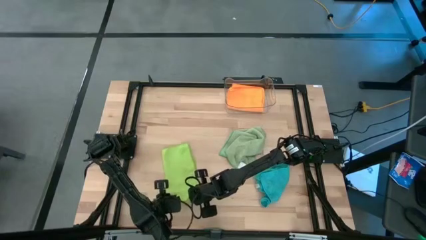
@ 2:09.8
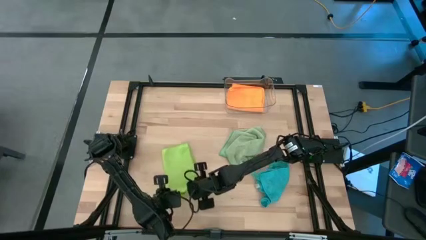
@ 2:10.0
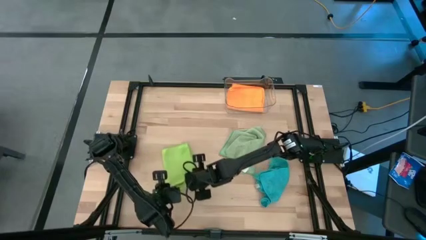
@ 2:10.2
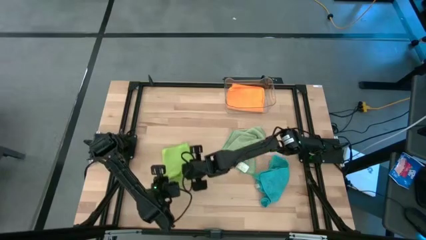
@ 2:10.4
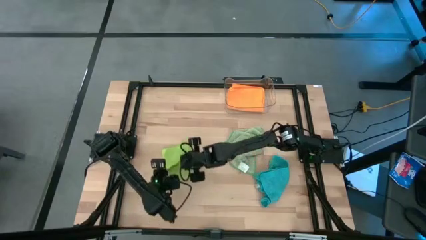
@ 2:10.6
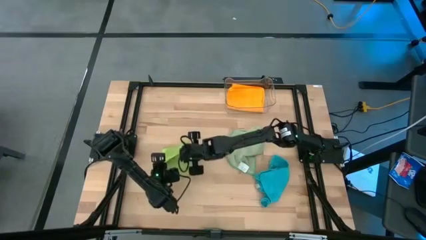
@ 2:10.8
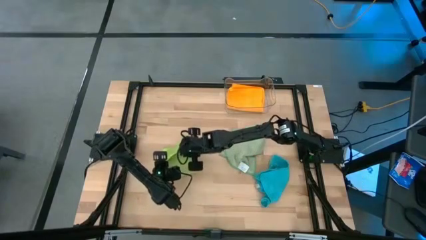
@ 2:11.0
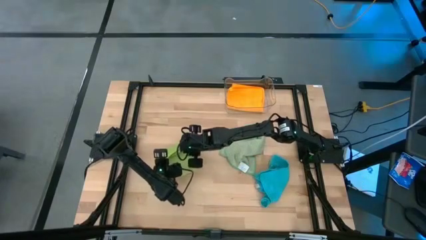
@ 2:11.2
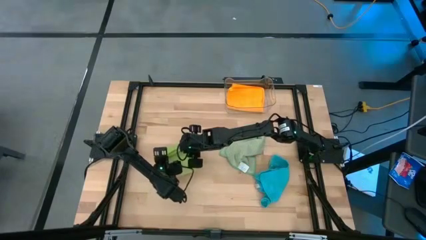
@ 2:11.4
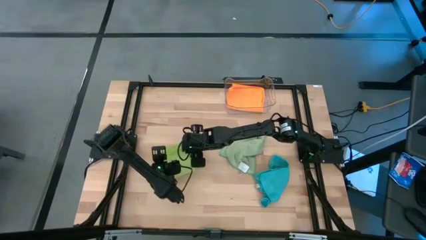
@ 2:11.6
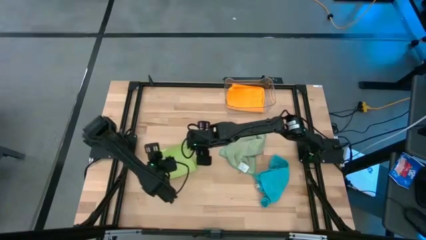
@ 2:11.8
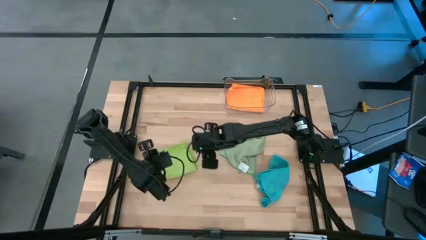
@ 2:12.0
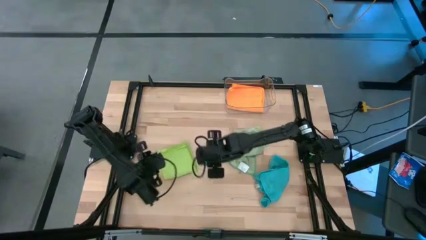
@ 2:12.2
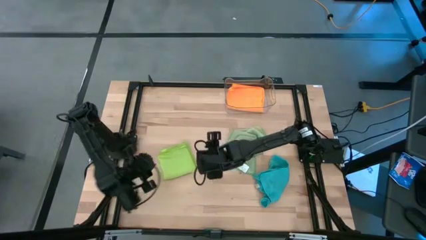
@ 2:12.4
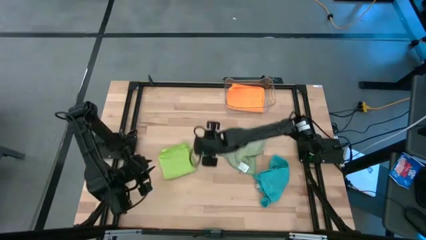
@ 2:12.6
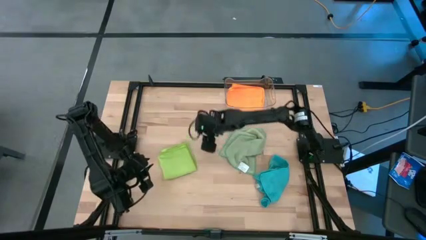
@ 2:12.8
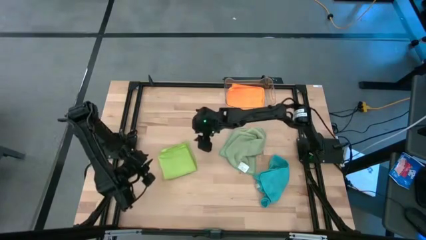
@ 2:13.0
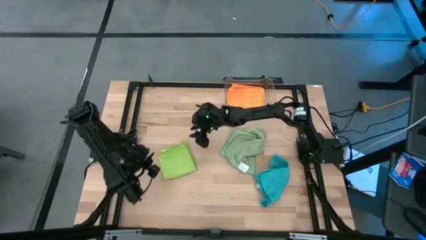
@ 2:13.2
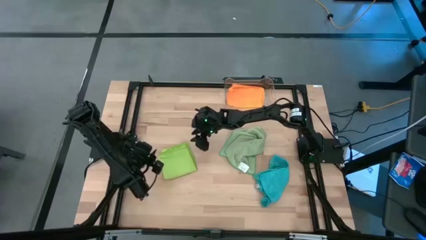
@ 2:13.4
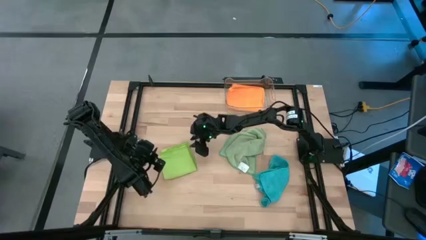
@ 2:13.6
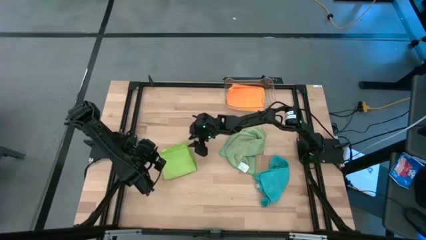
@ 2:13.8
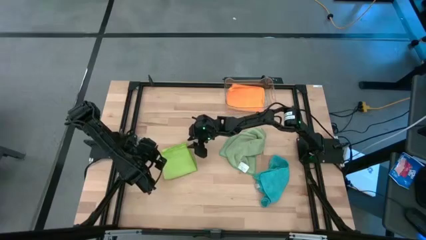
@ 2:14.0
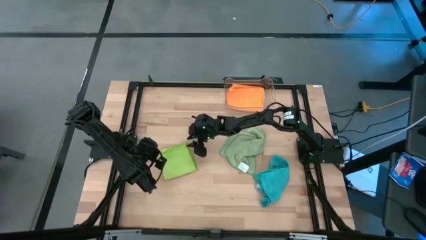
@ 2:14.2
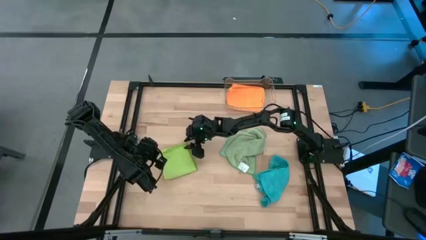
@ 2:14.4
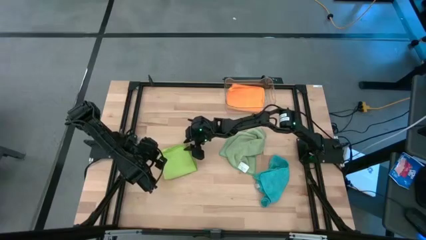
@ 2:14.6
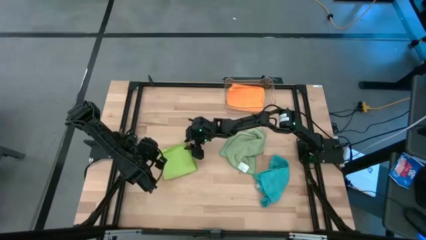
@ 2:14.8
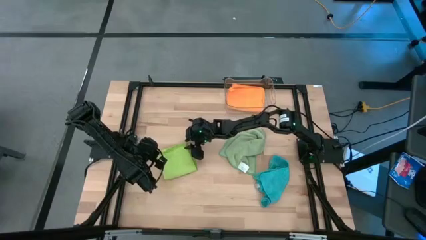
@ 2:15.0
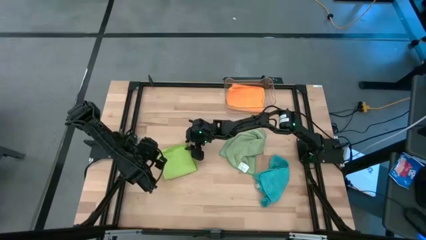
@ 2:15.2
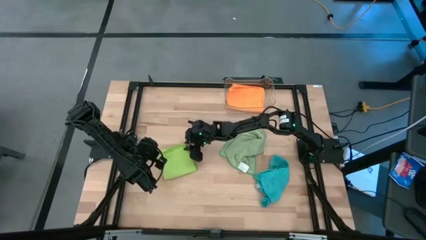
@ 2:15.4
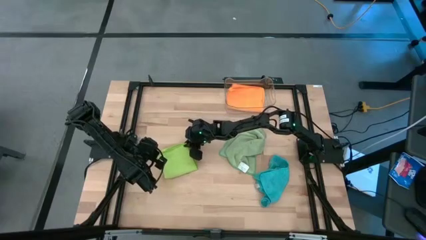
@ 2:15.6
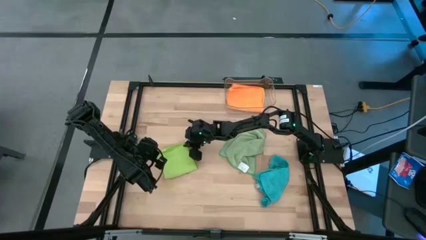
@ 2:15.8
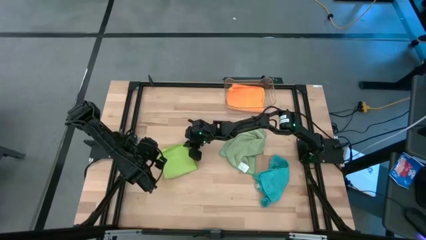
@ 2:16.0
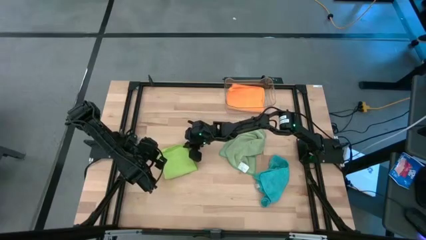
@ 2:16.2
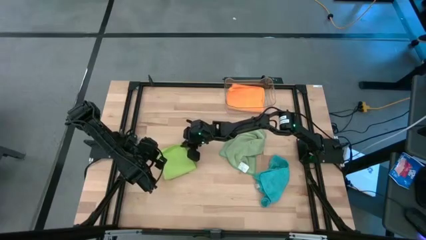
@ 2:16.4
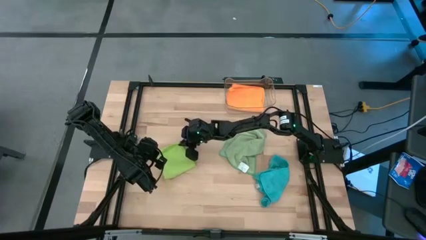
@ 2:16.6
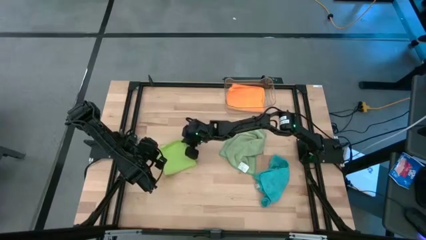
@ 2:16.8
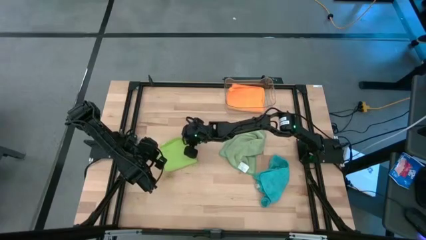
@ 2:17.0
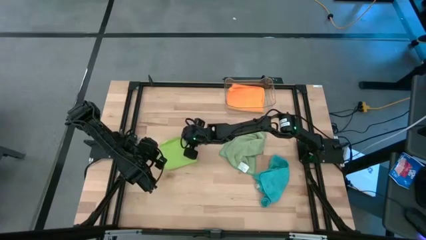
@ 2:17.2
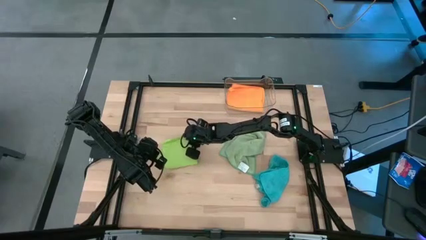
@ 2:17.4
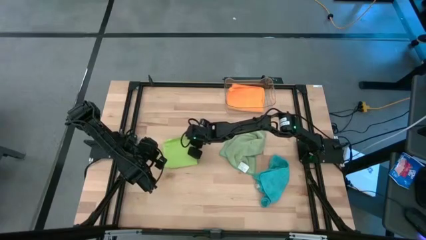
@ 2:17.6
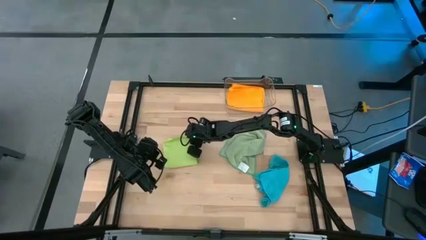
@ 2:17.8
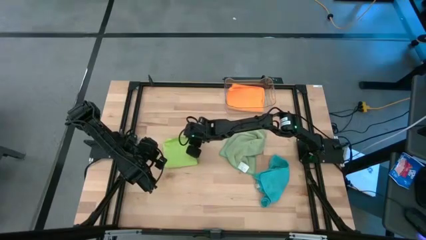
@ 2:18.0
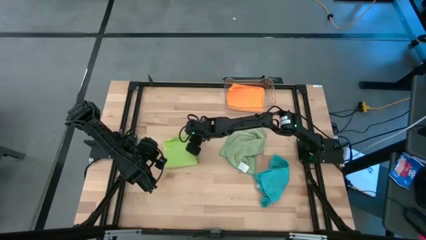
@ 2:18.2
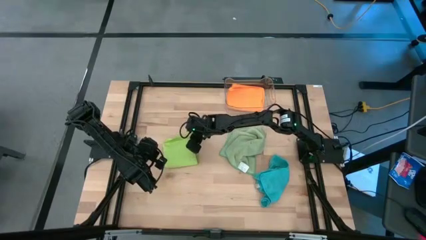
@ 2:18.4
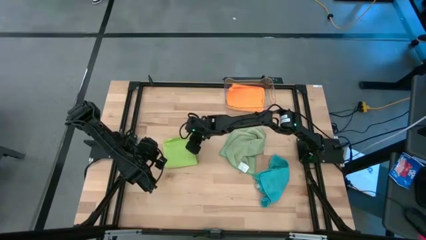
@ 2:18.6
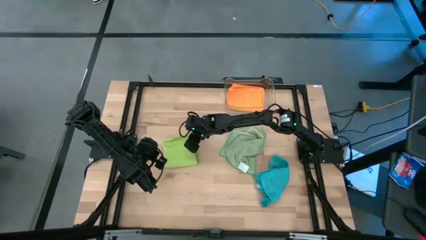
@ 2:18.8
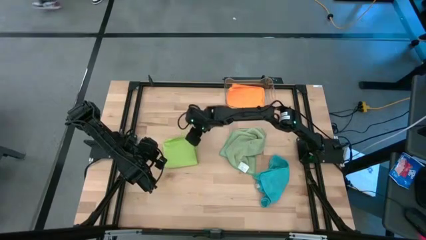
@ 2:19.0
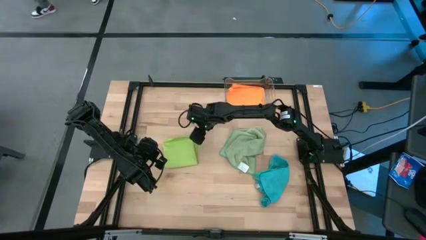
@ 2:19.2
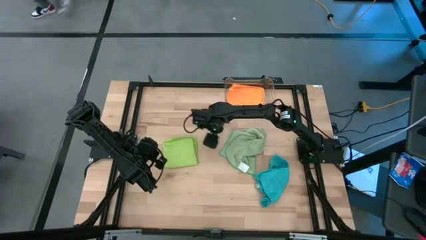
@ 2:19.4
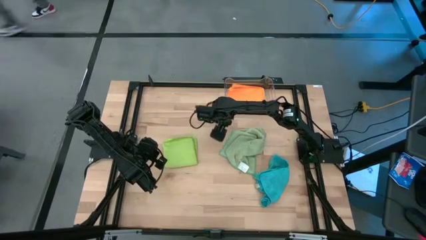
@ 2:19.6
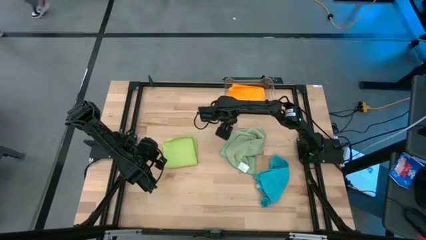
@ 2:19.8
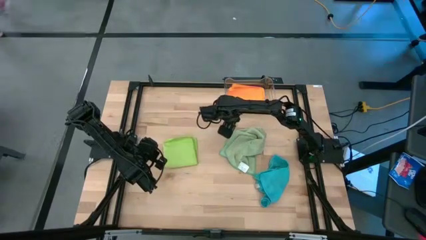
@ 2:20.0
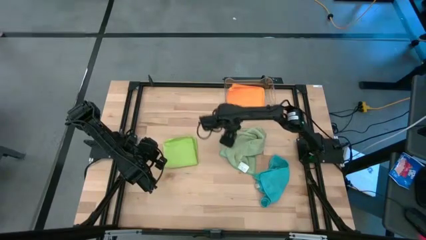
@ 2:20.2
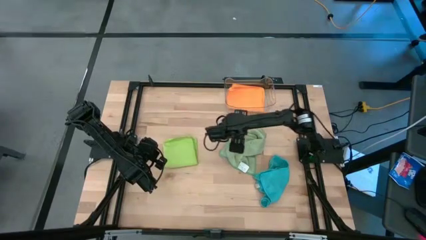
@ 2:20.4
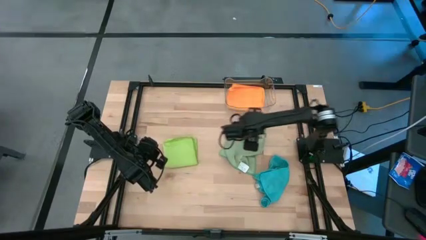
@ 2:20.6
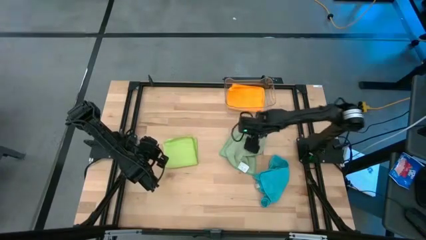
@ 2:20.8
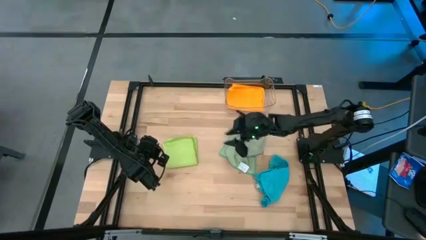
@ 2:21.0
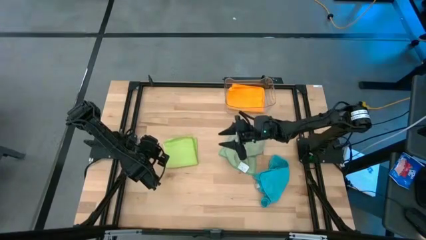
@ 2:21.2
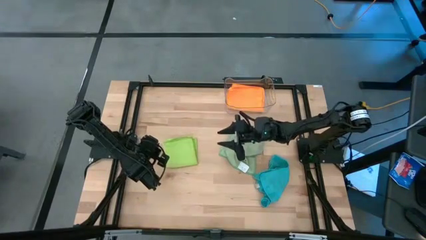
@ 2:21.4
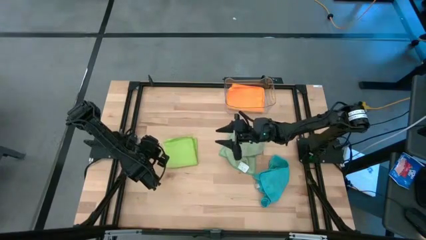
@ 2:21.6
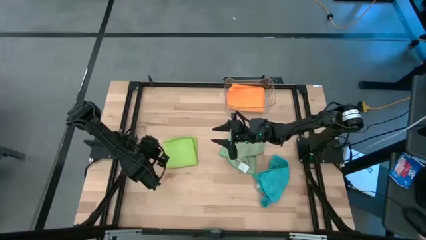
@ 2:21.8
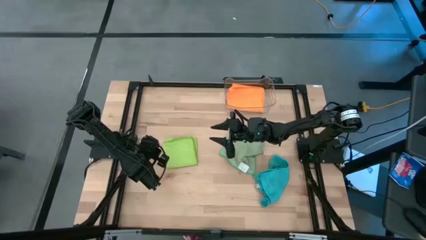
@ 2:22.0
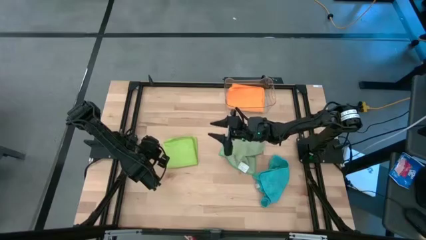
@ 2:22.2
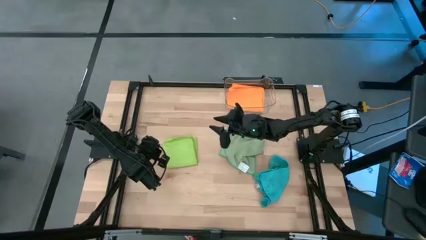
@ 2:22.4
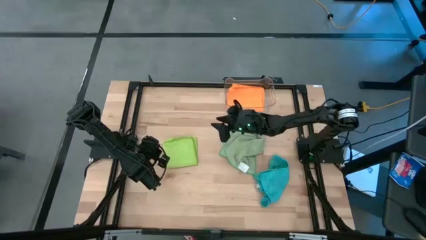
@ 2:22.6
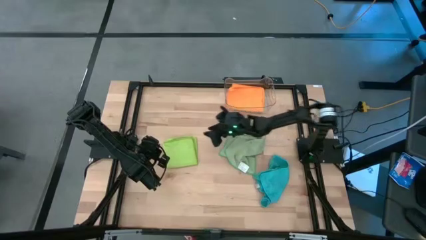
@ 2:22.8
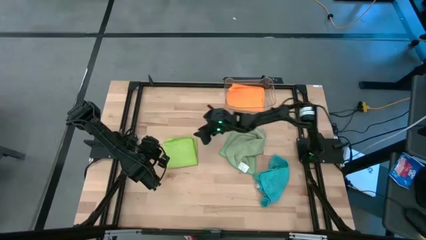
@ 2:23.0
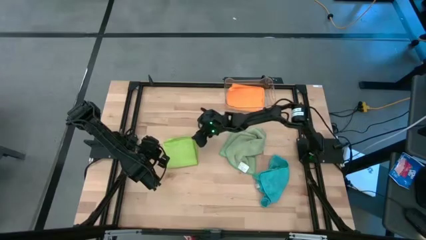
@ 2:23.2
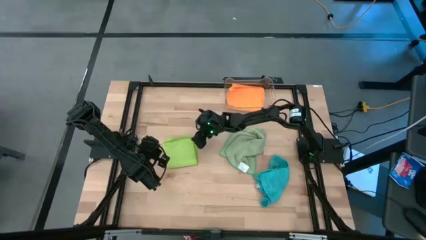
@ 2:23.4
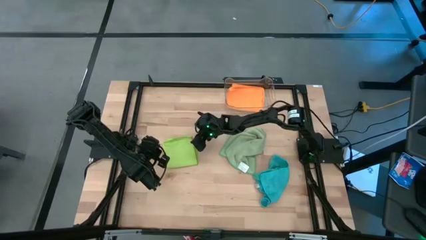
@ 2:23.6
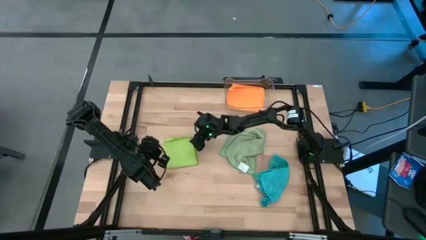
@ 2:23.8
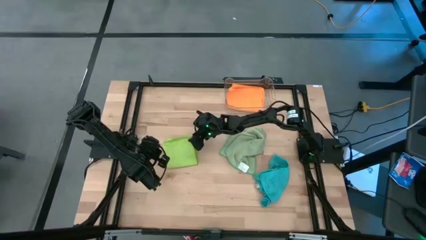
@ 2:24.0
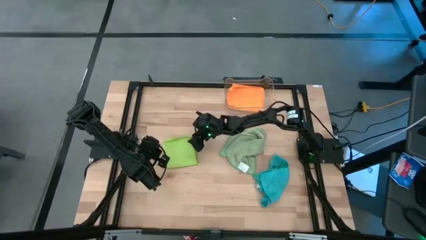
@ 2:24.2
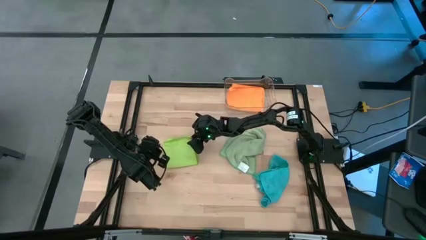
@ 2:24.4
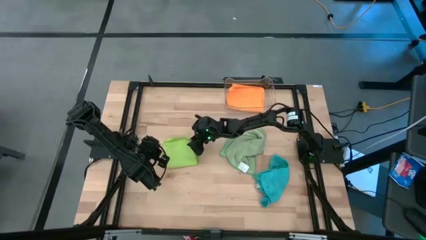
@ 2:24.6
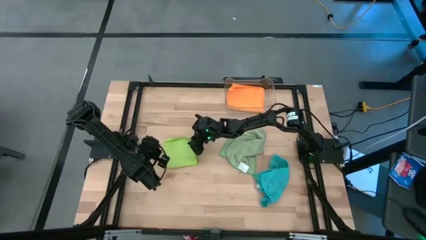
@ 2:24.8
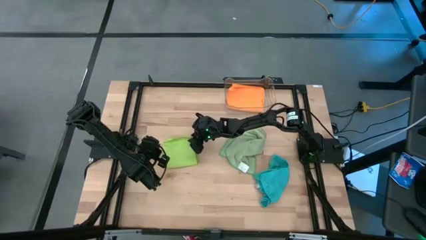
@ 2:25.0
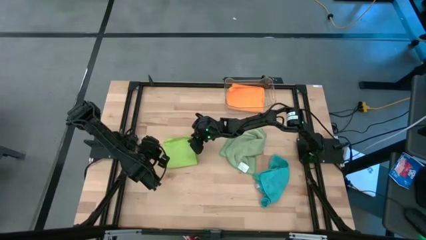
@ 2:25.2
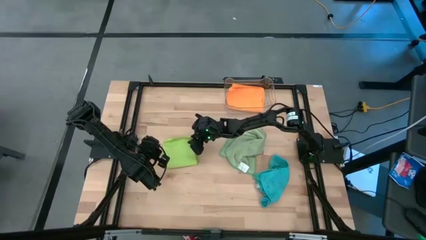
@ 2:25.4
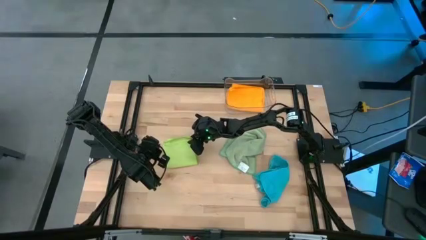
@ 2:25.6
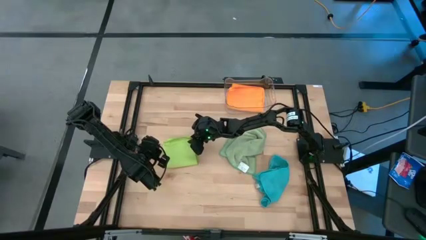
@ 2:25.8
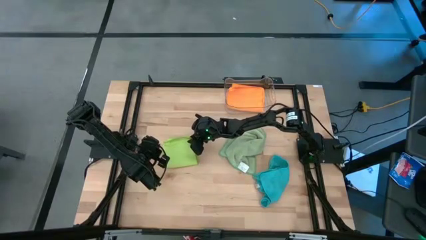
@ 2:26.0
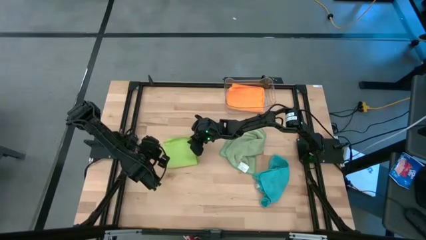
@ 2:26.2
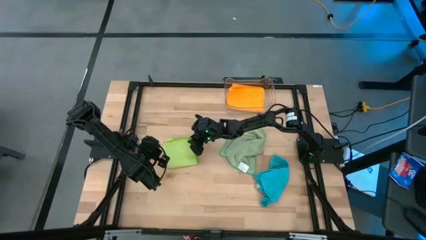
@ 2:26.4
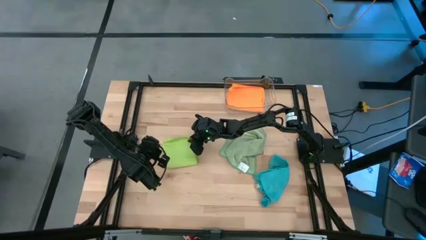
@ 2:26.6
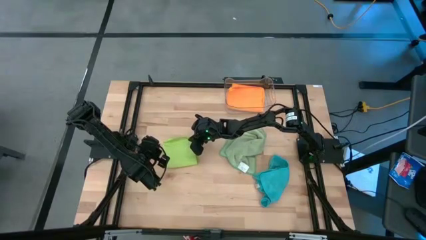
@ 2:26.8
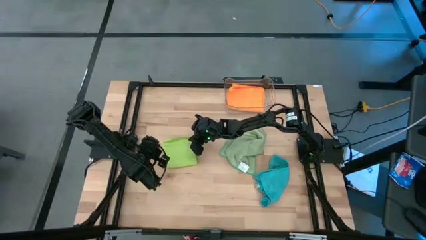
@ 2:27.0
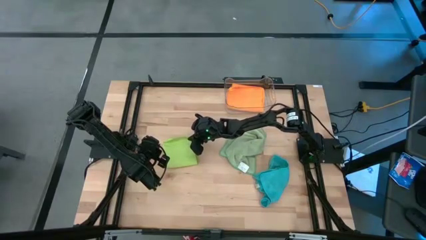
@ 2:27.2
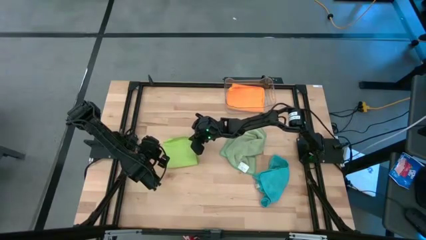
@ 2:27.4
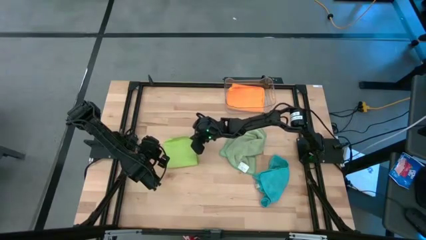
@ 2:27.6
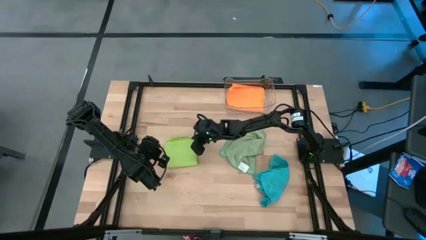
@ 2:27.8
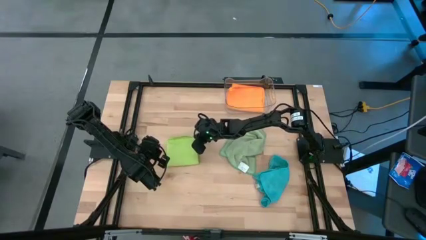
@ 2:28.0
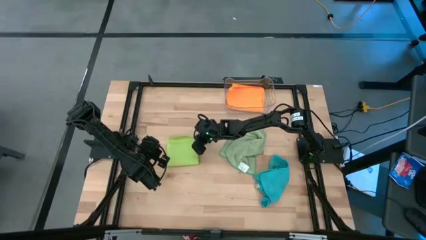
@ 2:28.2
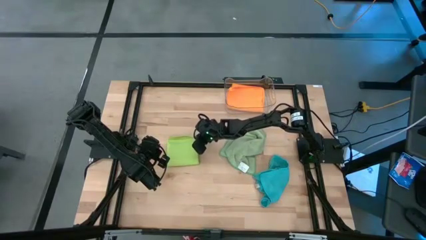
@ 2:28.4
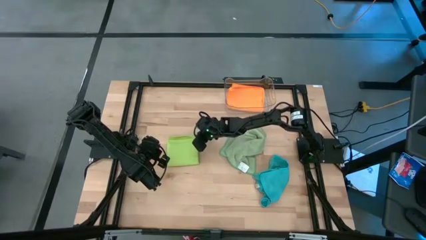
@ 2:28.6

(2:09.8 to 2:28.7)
Task: Fold microfiber towels
Fold the light green microfiber towel
